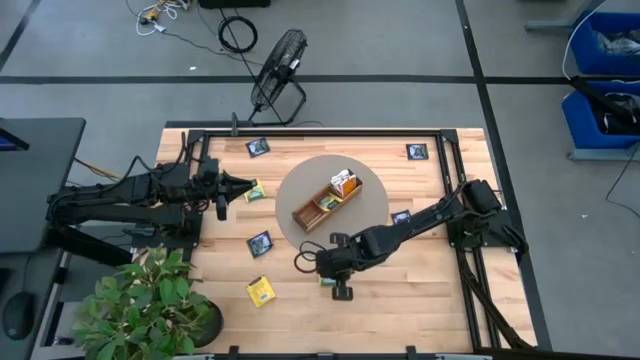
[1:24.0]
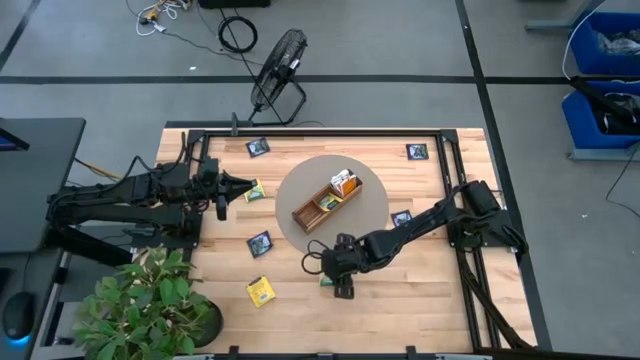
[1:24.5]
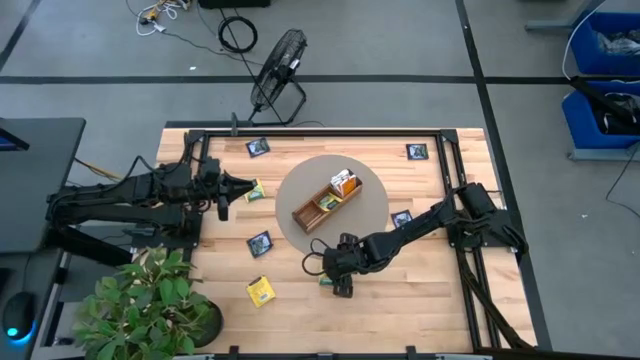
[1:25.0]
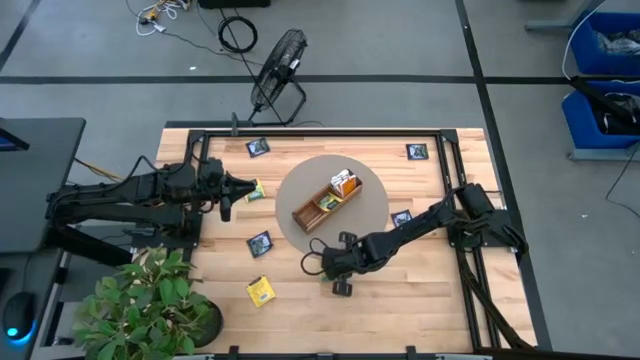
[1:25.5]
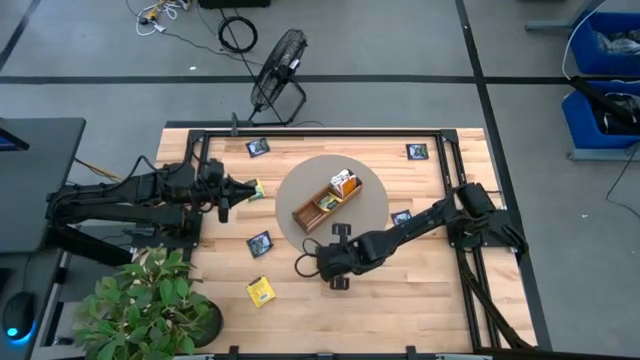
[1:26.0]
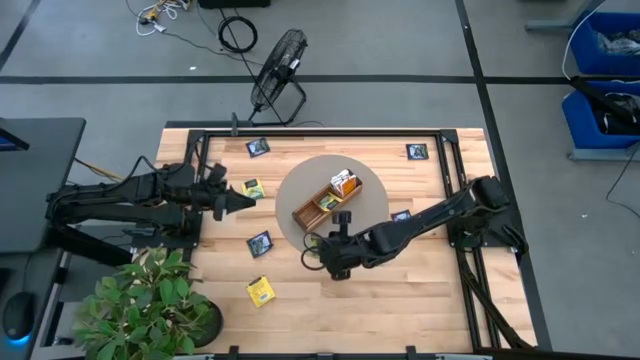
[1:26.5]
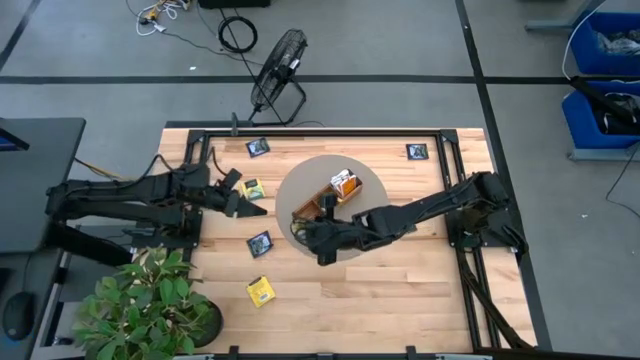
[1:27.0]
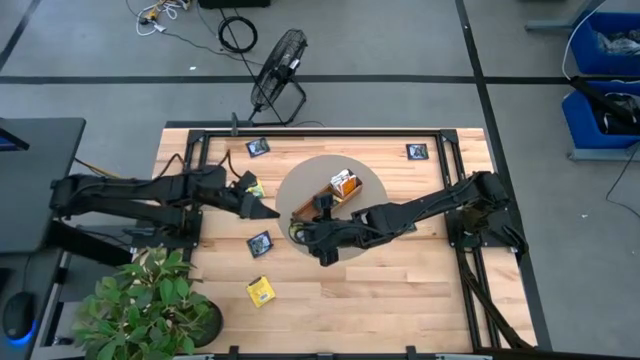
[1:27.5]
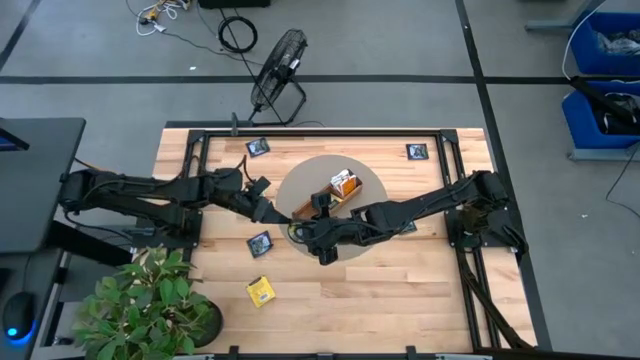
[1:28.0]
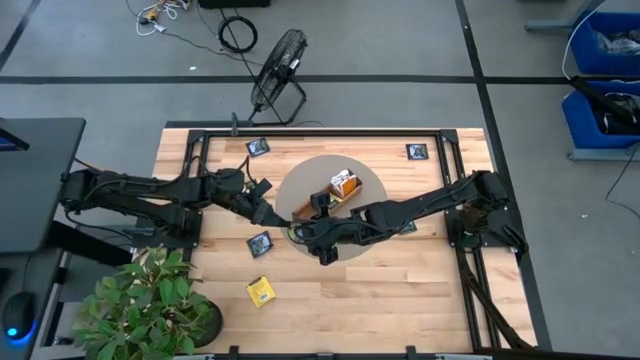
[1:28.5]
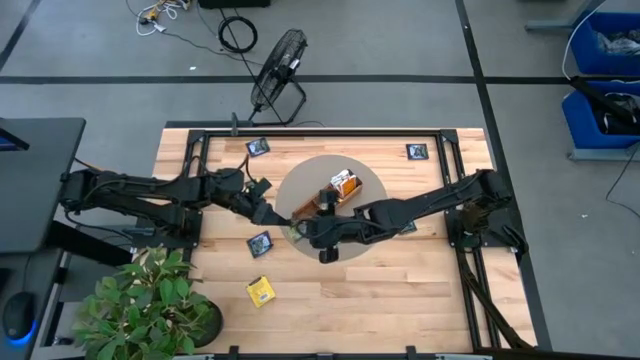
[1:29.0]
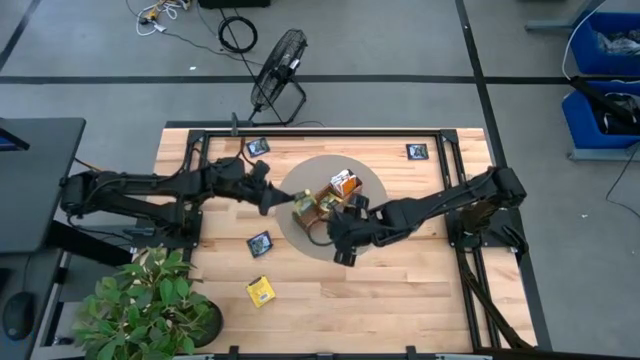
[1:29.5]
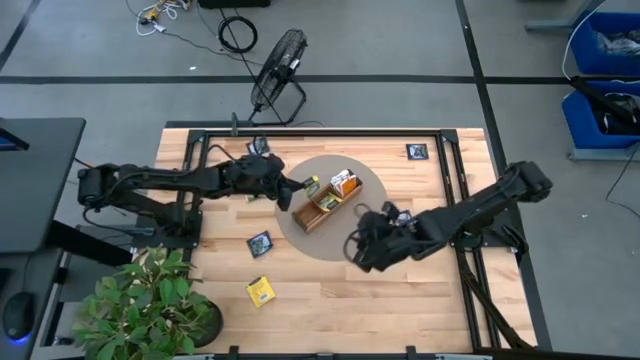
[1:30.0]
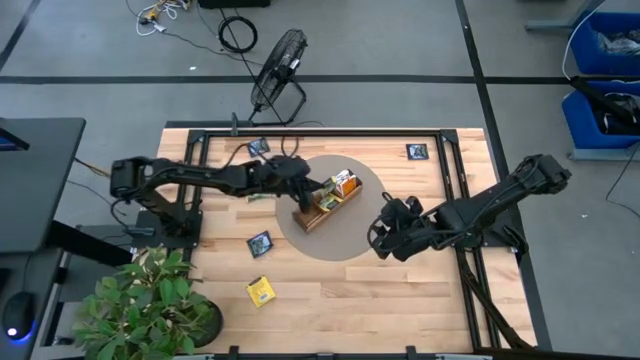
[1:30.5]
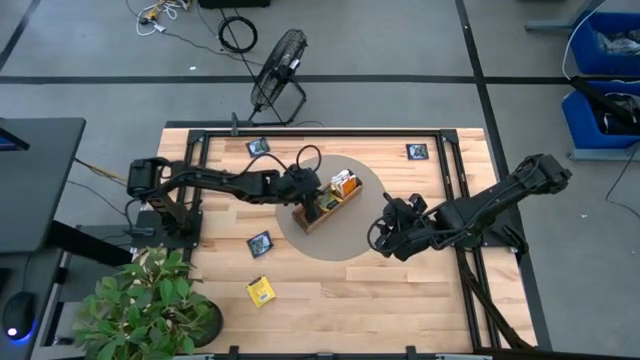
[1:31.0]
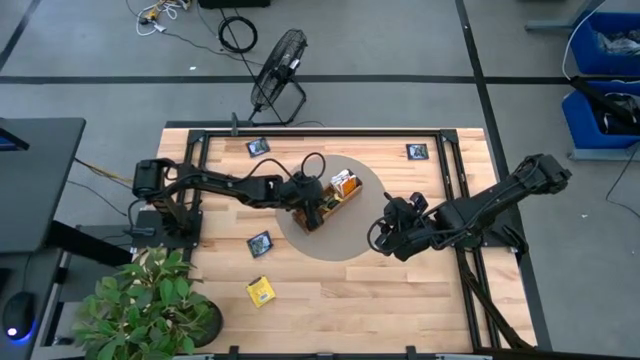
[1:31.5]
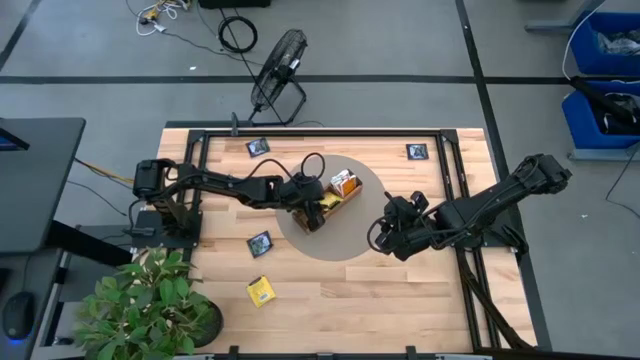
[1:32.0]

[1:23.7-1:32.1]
Task: Pick & Place Tea
Put the yellow tea bag into the middle section of the wooden organizer

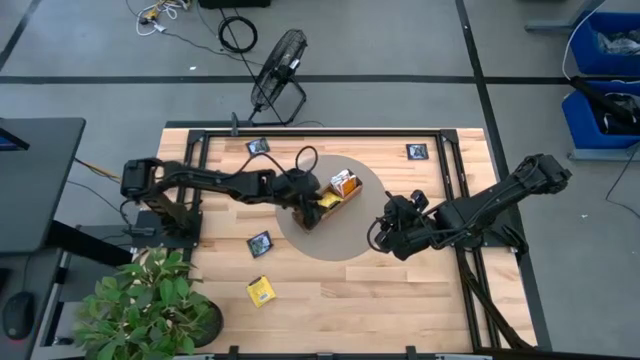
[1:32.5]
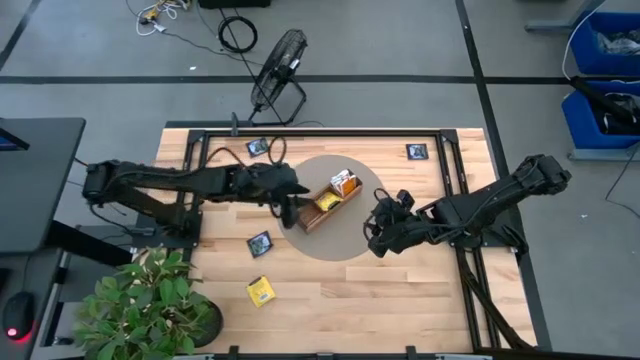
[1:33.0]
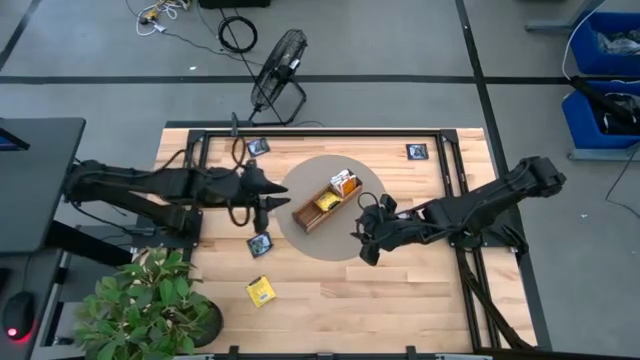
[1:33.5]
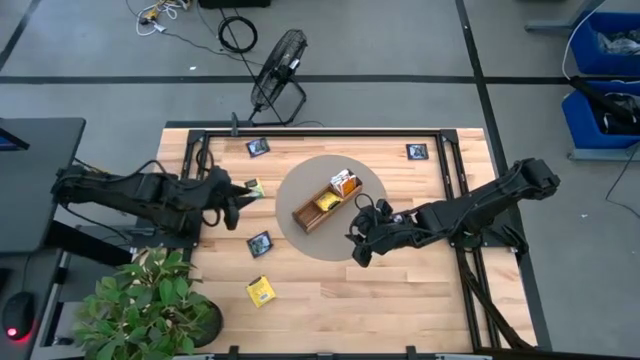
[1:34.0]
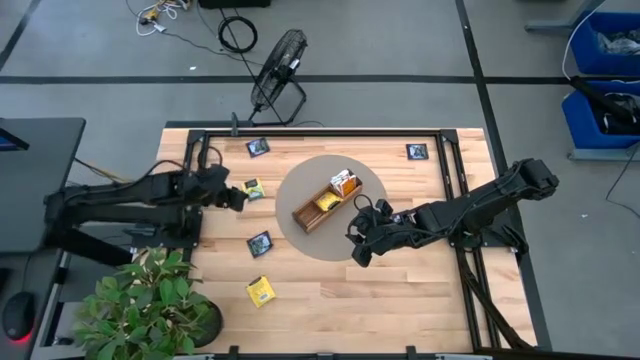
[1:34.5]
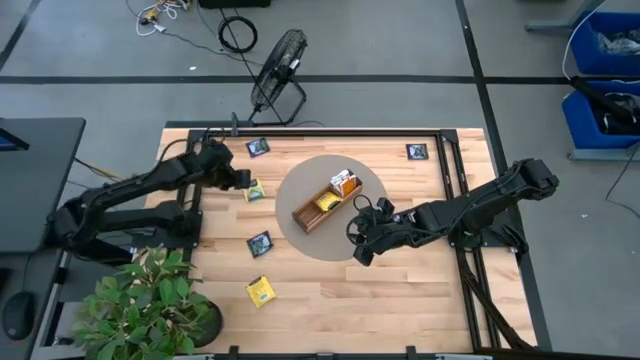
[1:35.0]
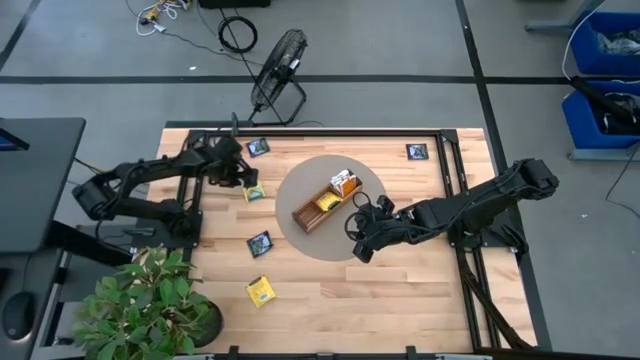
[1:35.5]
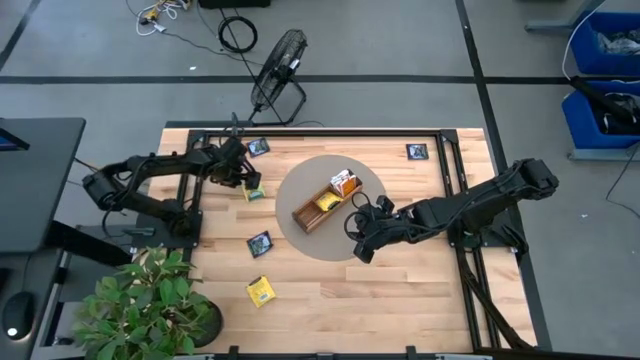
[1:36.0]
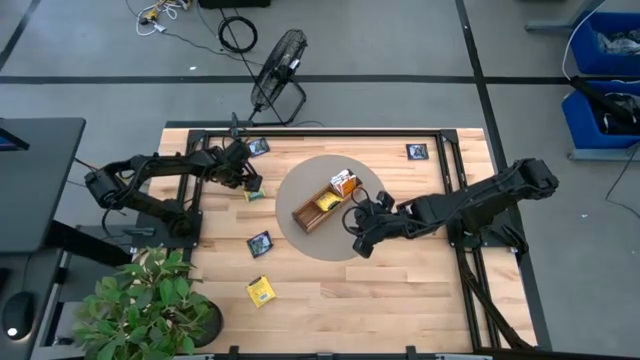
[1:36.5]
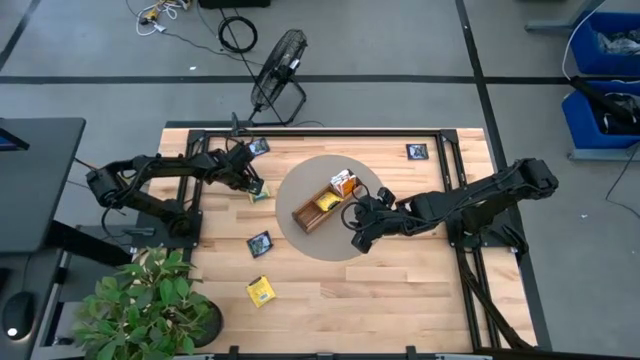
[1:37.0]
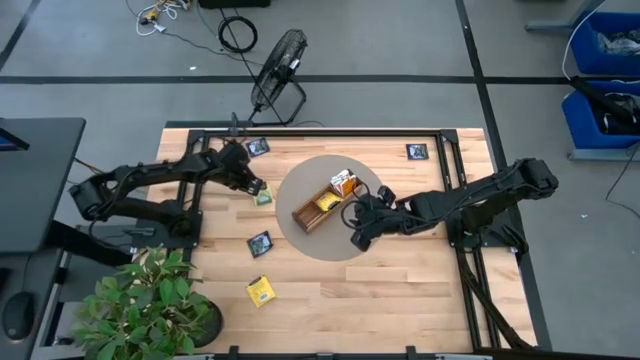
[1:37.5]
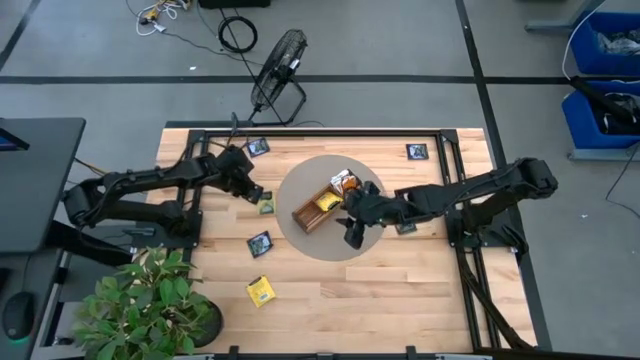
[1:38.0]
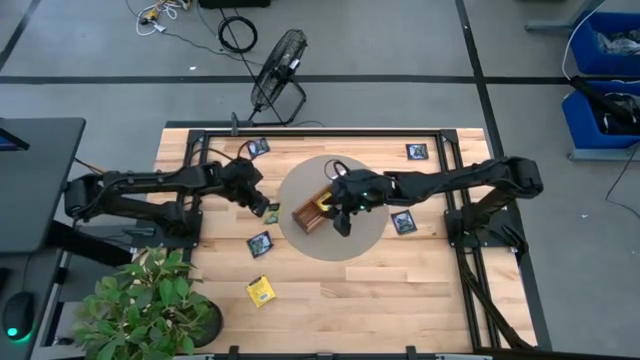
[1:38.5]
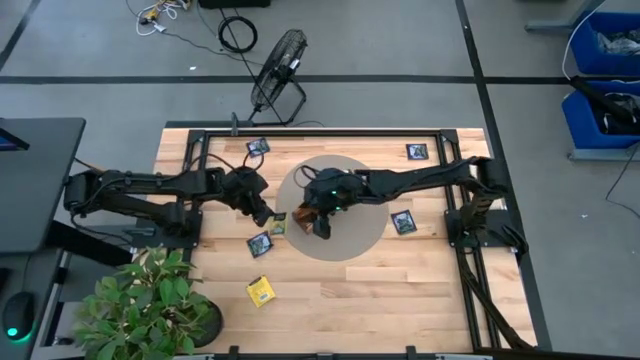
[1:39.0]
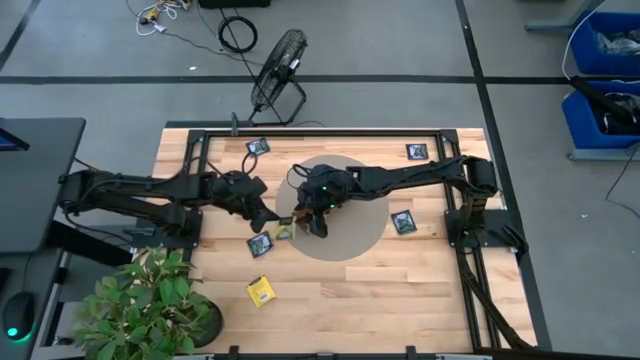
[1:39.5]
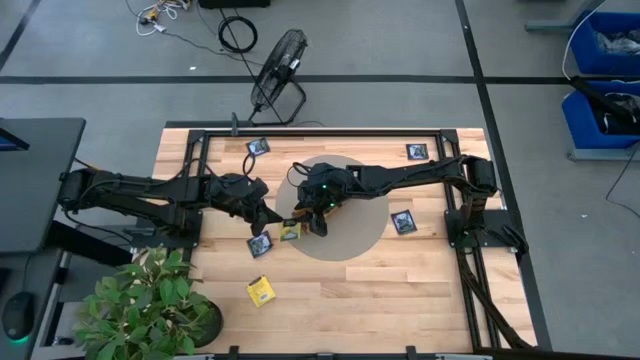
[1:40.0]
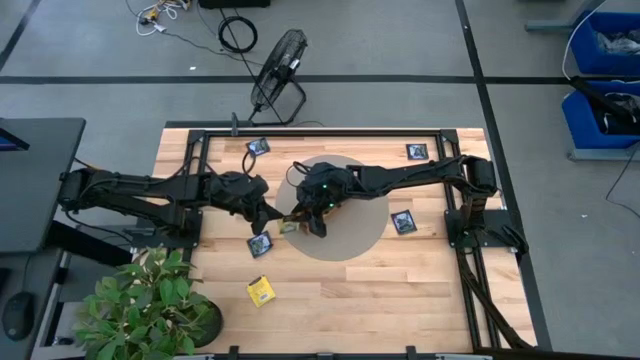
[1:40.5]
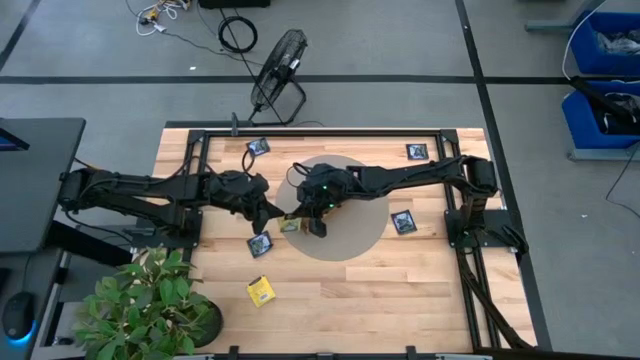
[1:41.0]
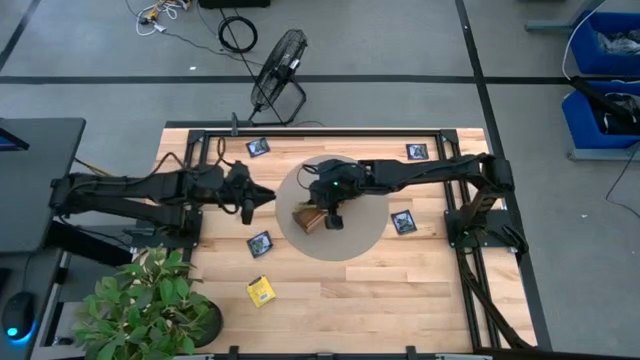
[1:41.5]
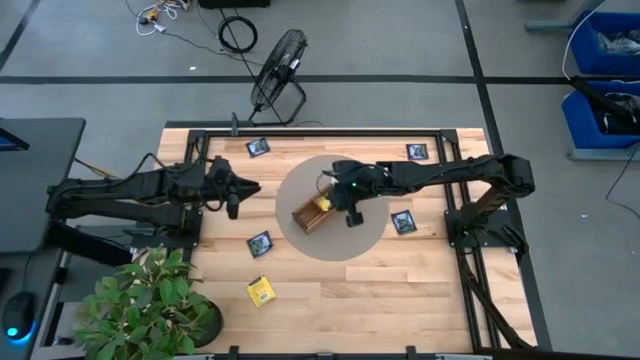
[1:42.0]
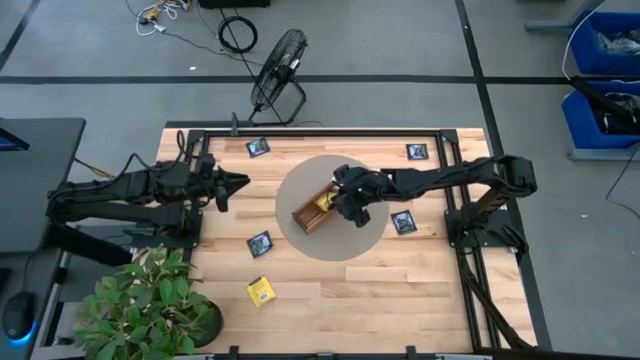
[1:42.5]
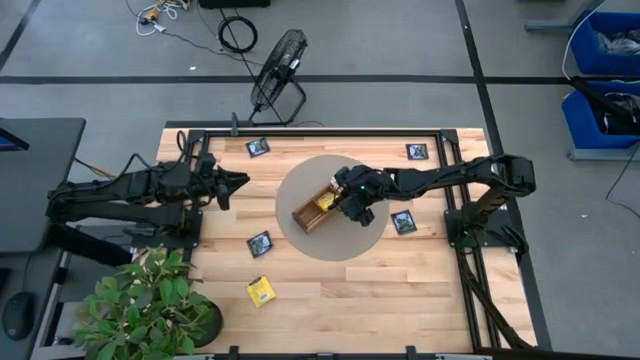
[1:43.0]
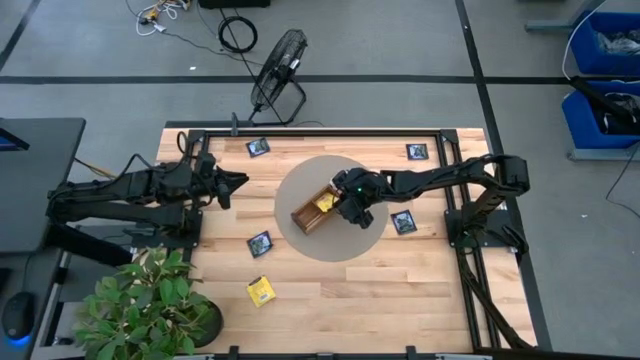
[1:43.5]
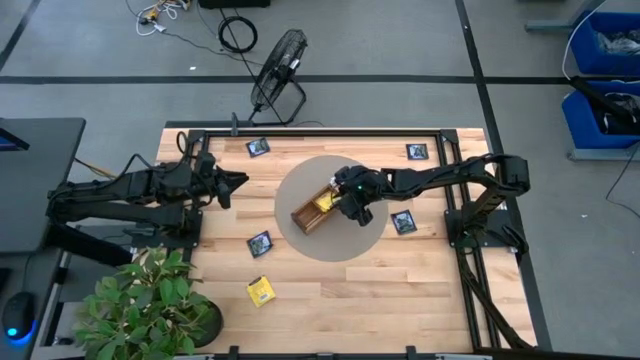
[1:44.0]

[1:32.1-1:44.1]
Put the yellow tea bag into the middle section of the wooden organizer

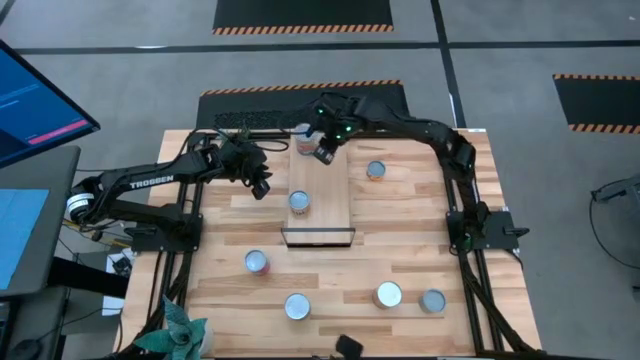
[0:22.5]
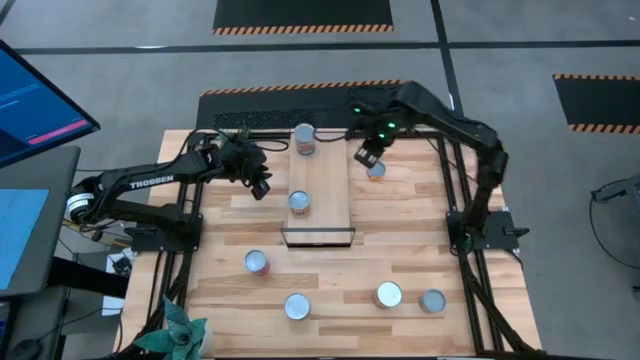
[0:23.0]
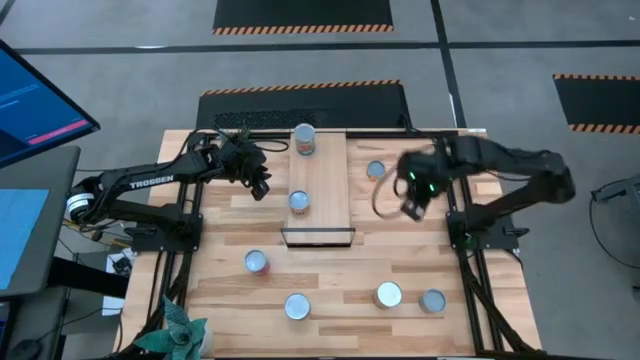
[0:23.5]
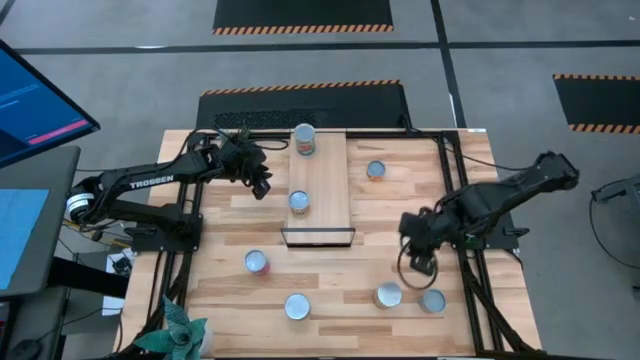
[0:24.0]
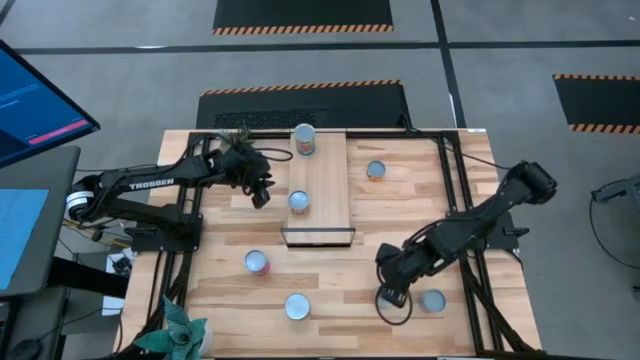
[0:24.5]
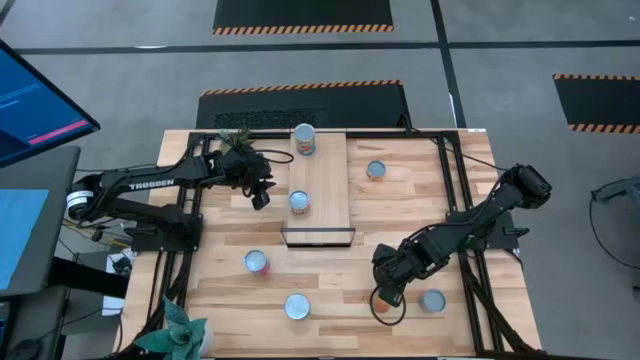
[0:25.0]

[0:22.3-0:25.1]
Task: Pick and place cans onto a shelf
Put the canned green beans on the shelf
